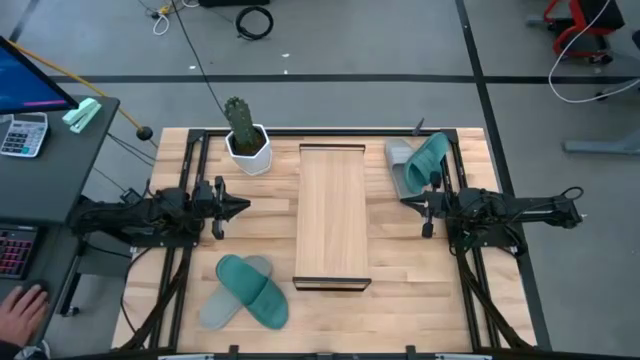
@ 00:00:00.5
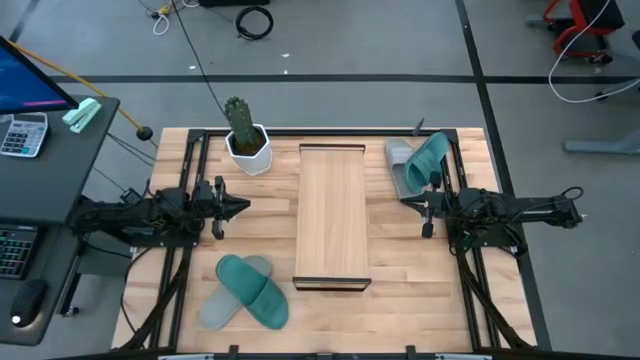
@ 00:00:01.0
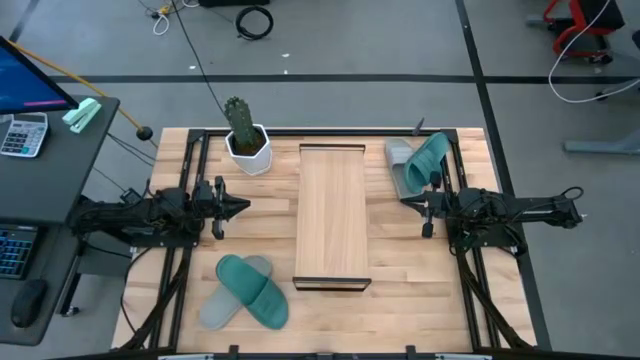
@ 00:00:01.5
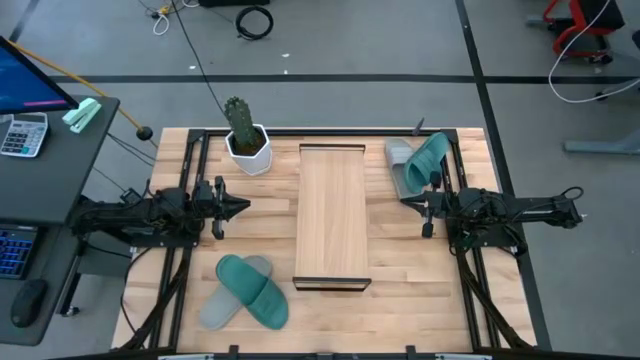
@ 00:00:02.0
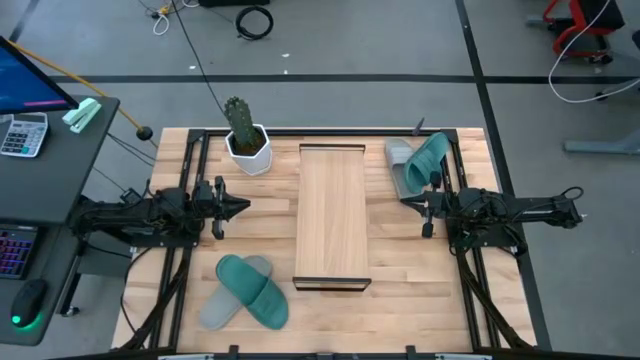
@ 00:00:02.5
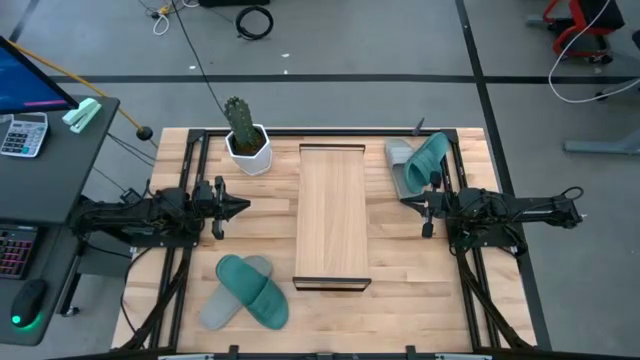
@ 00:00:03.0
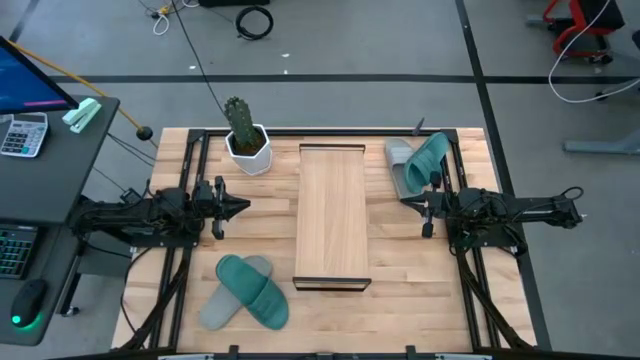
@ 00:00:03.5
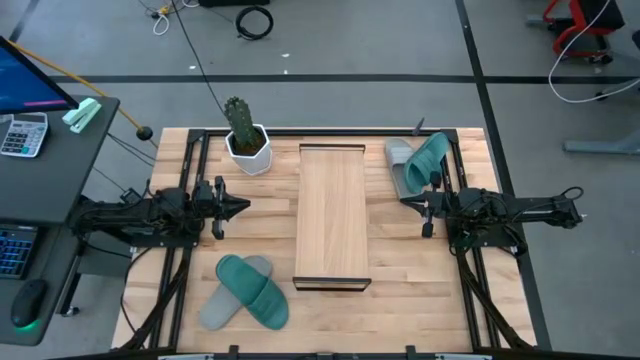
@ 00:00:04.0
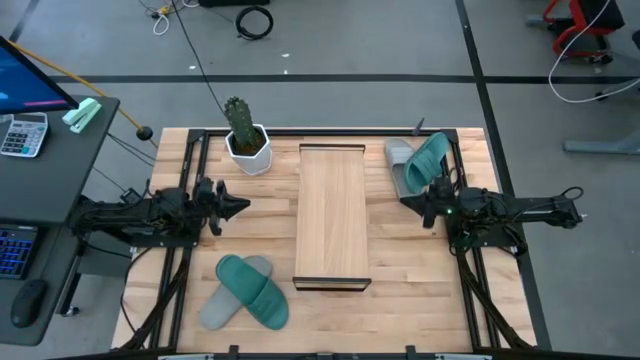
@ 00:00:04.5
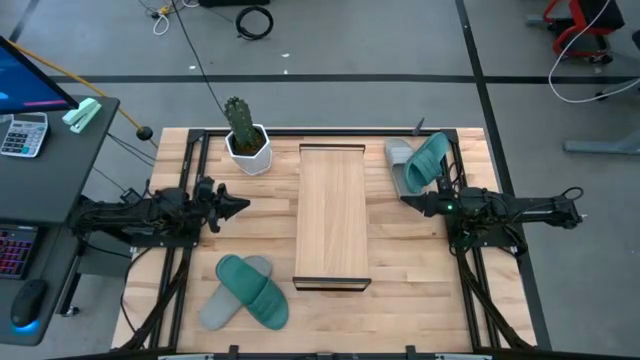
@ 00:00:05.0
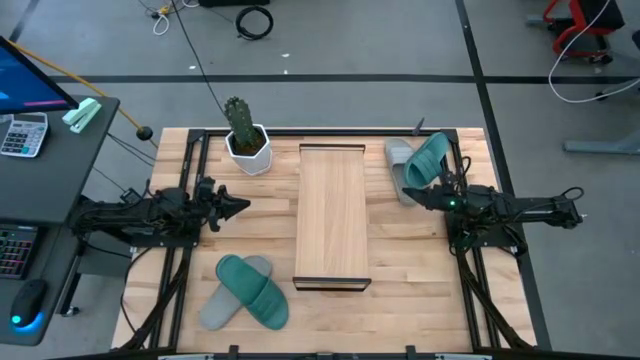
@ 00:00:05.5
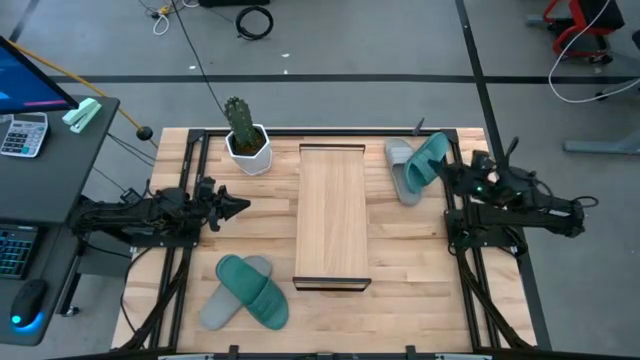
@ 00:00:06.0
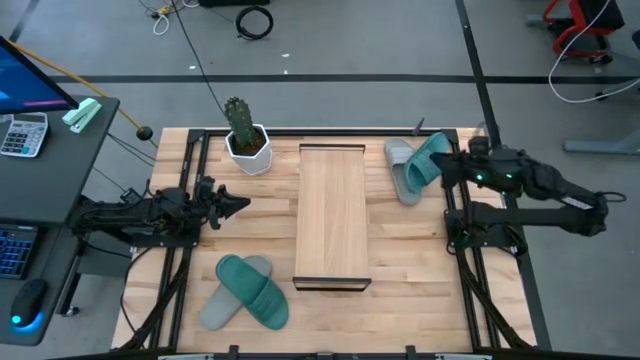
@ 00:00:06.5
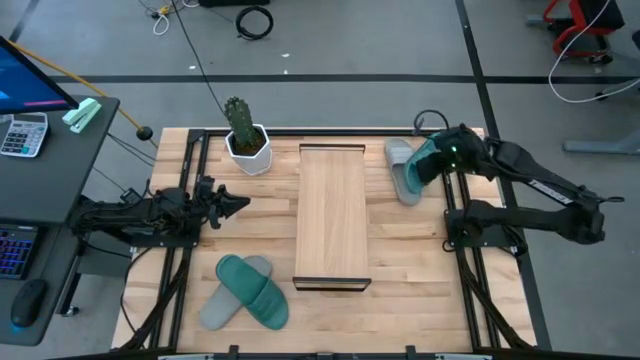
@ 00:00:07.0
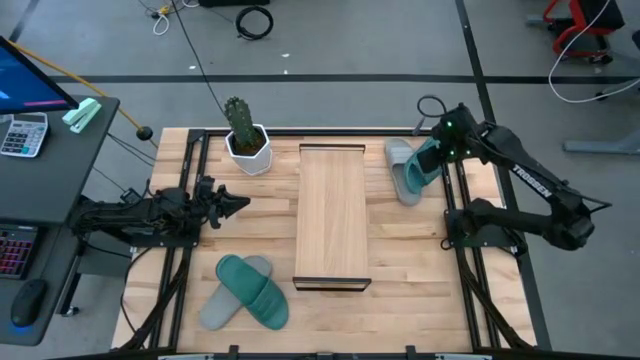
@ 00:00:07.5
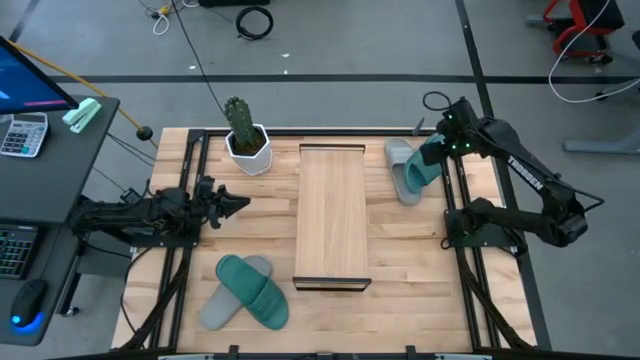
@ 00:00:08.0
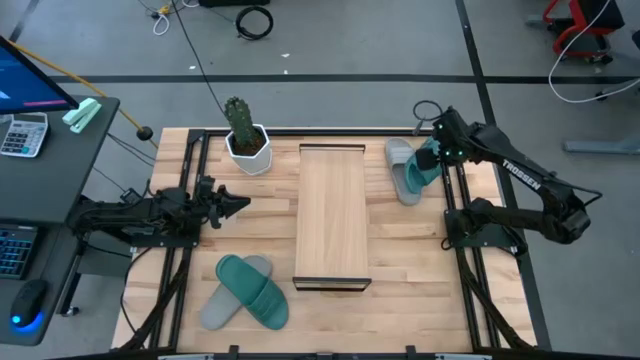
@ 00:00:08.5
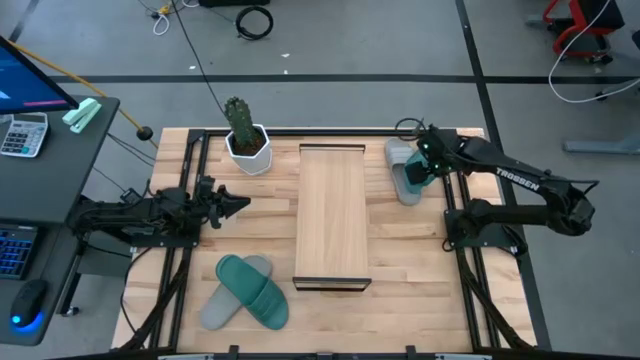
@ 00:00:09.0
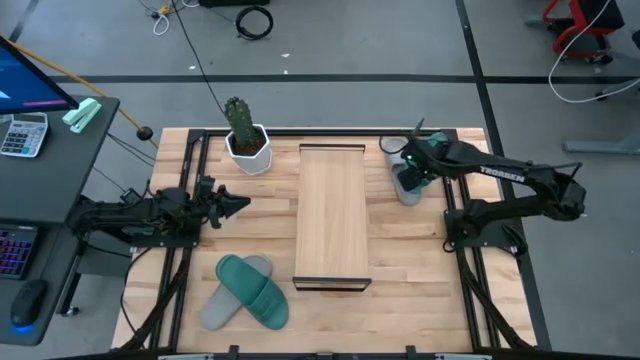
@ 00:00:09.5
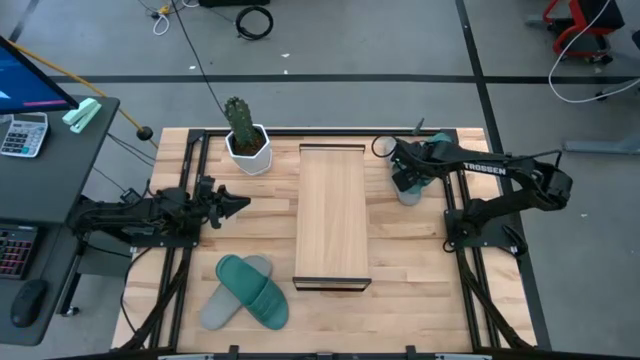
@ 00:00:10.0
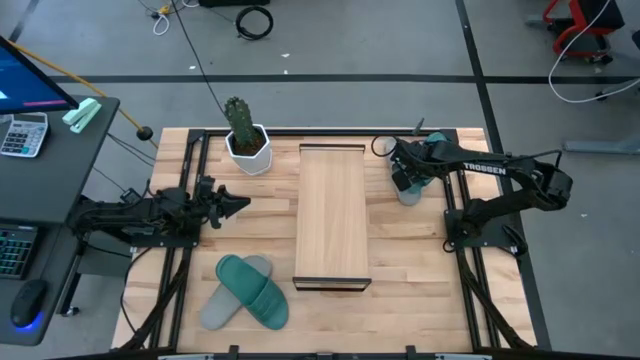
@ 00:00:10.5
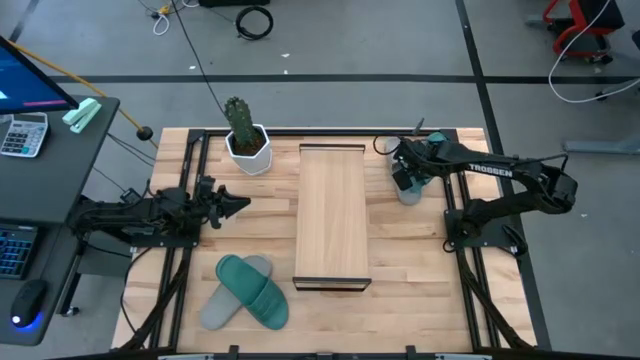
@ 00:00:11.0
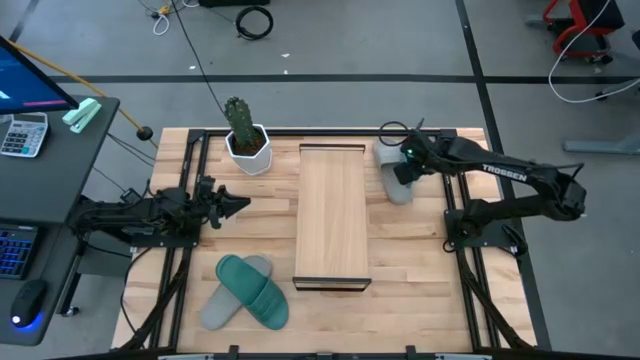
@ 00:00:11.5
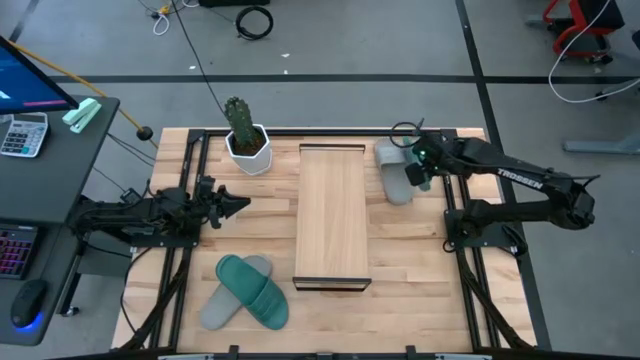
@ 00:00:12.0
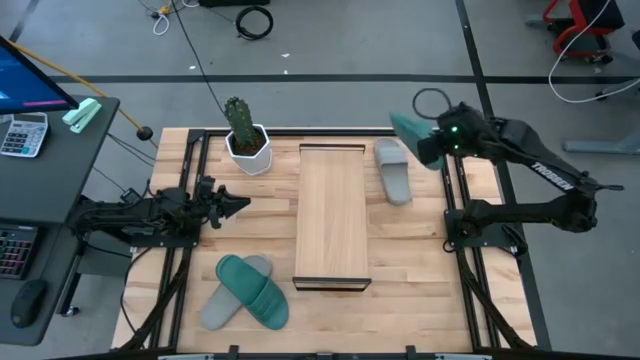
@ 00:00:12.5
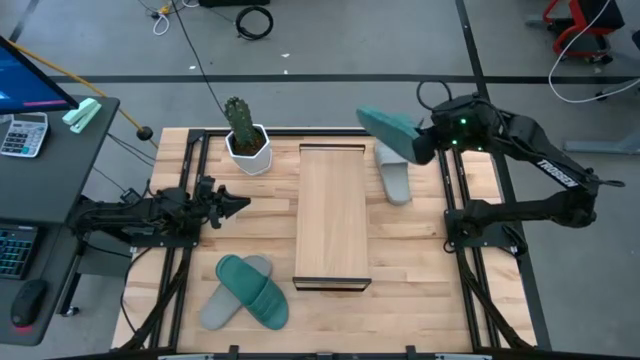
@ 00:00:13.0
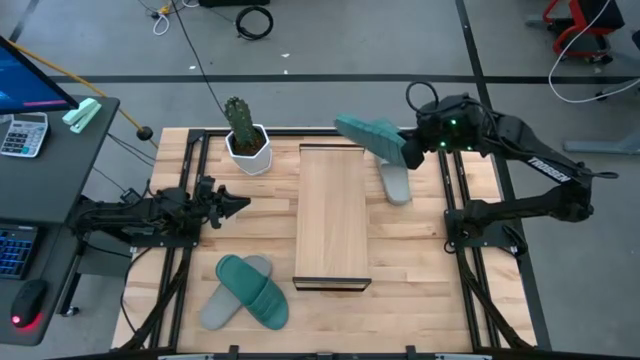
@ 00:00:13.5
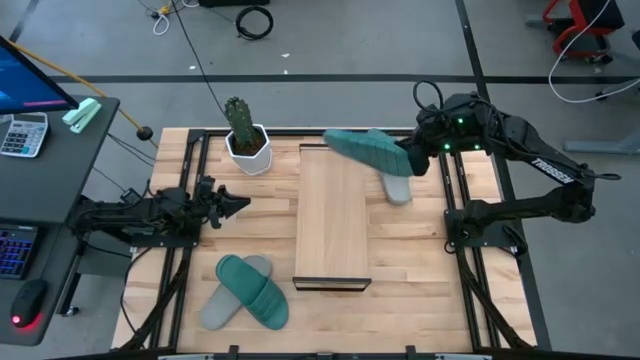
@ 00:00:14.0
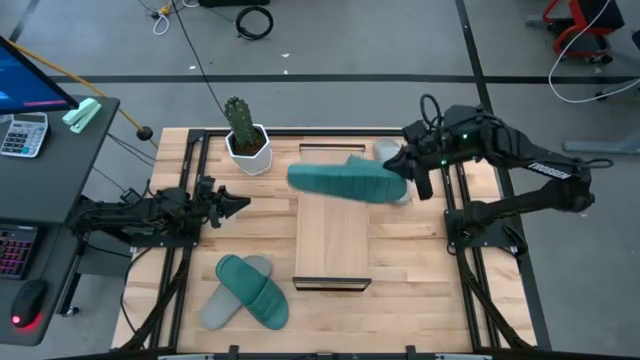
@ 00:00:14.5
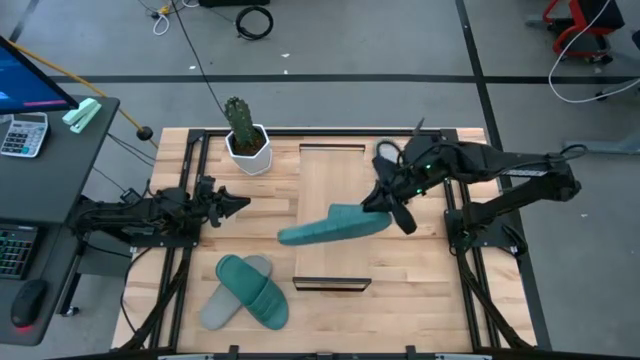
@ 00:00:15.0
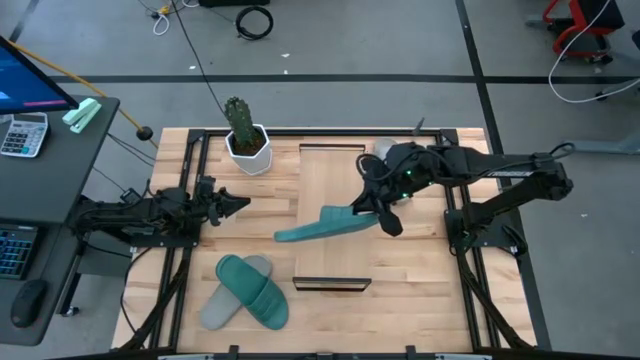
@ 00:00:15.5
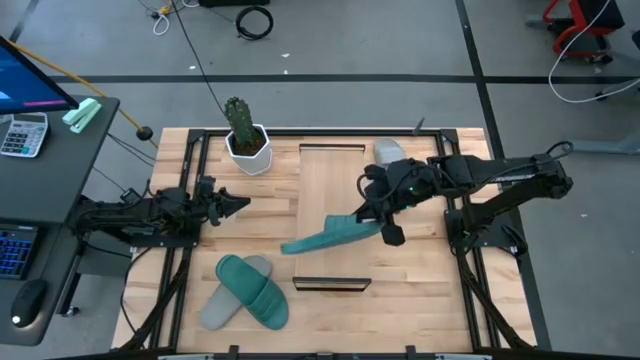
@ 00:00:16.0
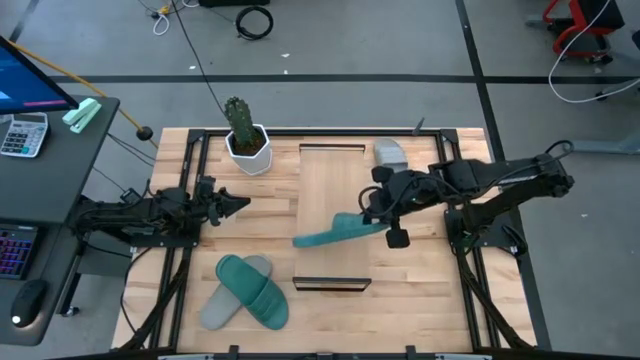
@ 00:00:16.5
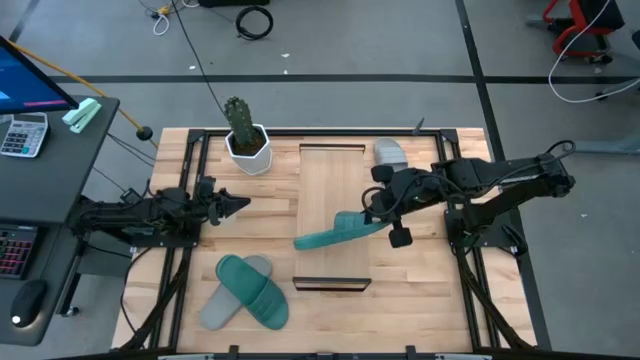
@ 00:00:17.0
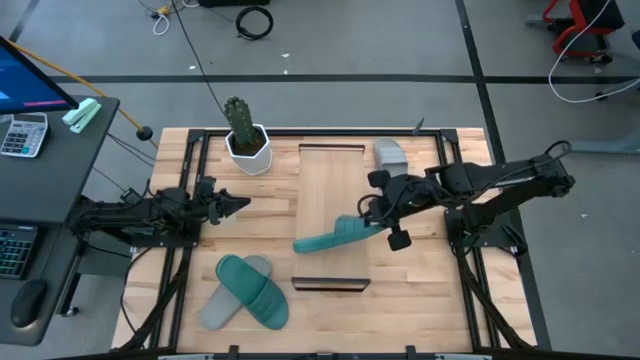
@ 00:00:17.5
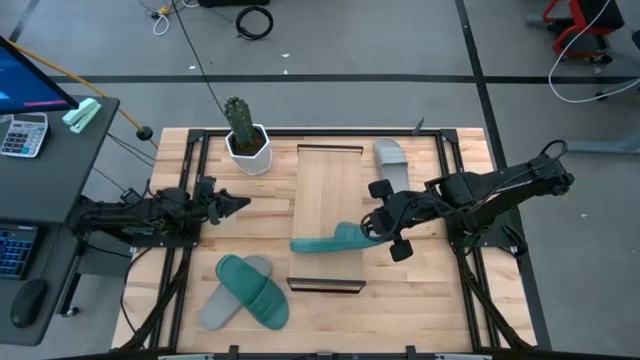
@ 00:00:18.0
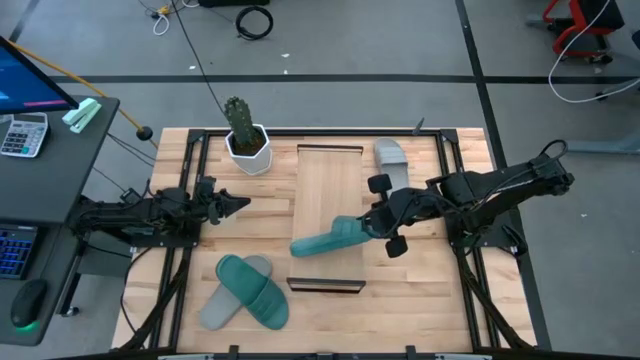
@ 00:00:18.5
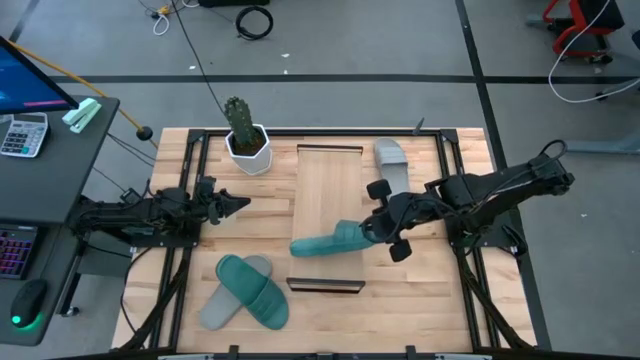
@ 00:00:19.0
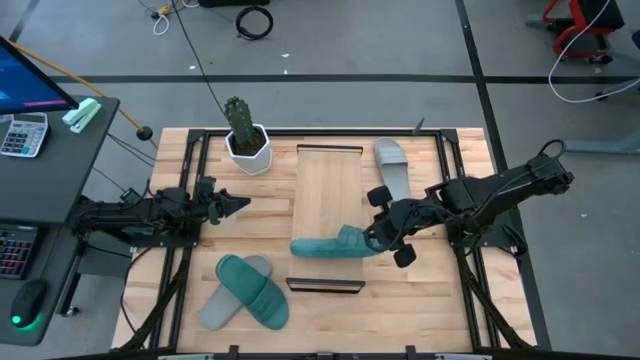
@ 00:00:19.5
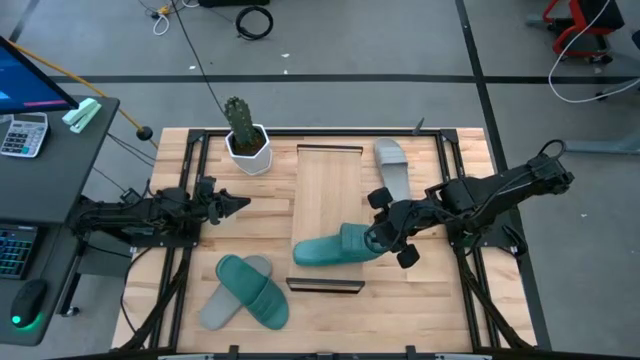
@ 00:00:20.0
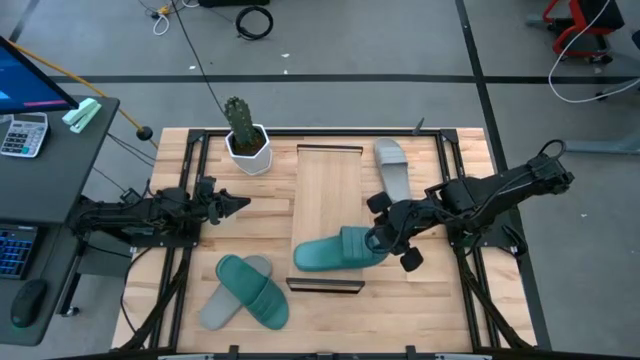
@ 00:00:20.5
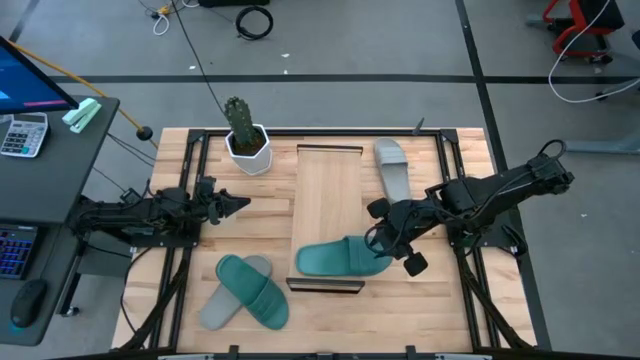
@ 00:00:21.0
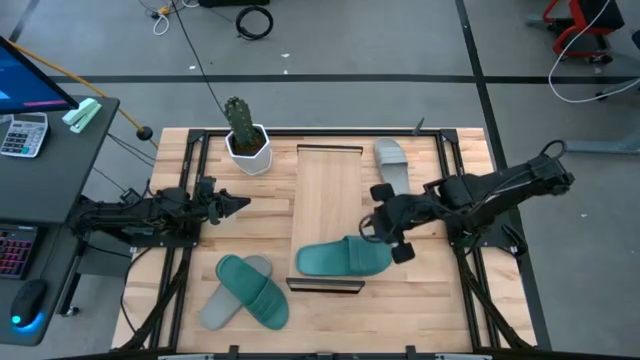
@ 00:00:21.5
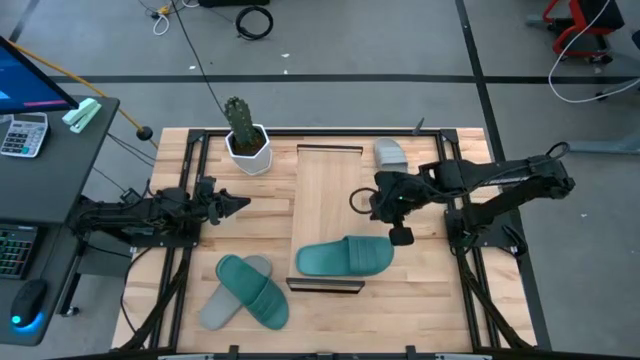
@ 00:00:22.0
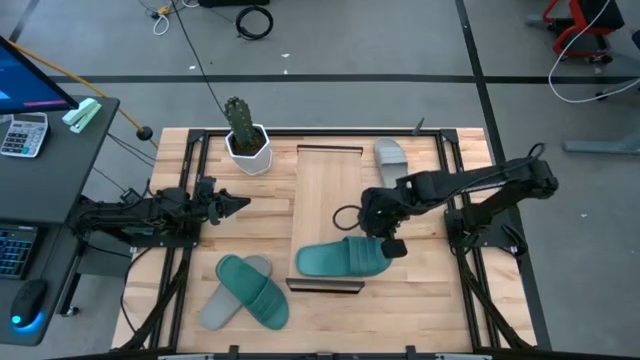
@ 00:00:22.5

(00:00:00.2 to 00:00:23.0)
Task: Pick and place slides into the shelf
Put the right blue slipper on the shelf
